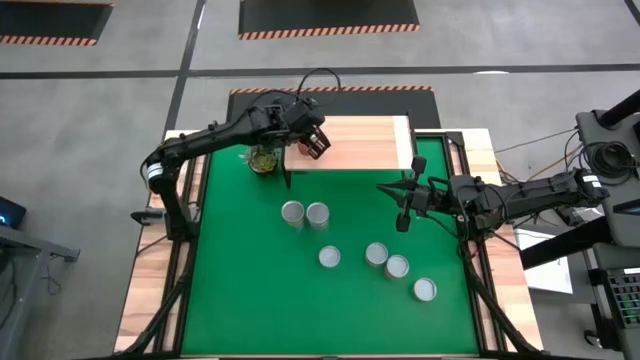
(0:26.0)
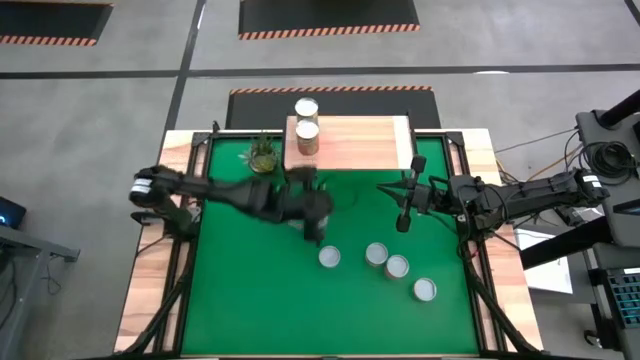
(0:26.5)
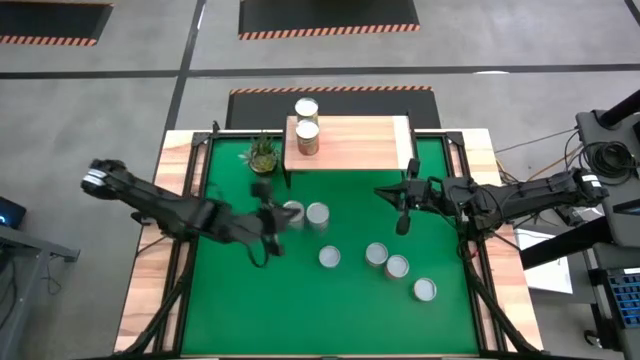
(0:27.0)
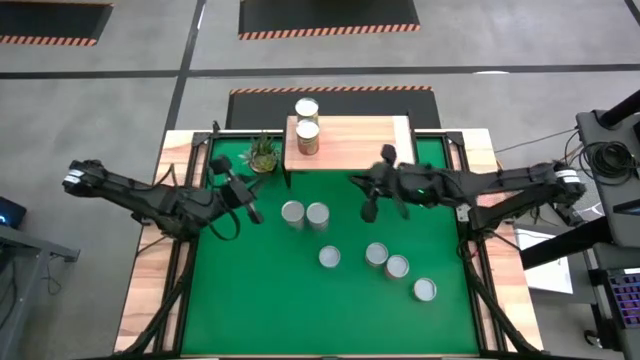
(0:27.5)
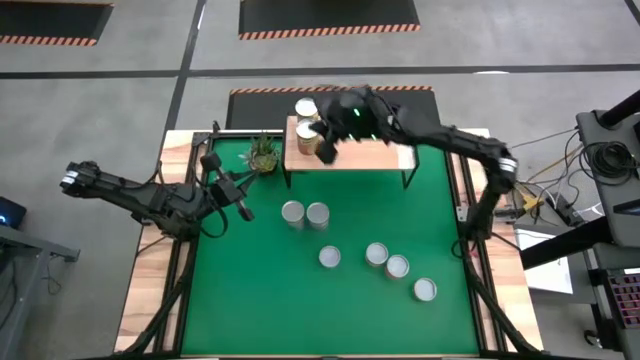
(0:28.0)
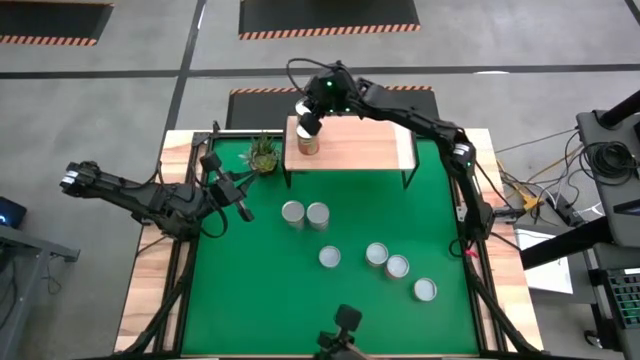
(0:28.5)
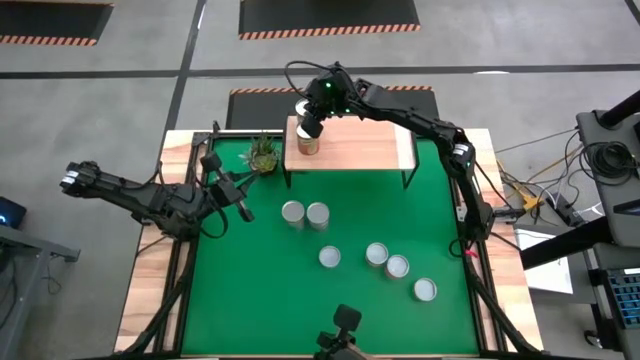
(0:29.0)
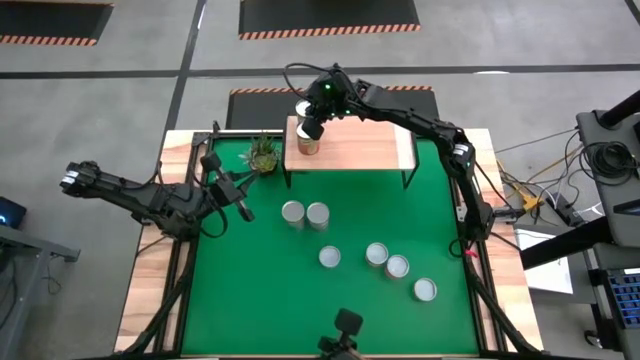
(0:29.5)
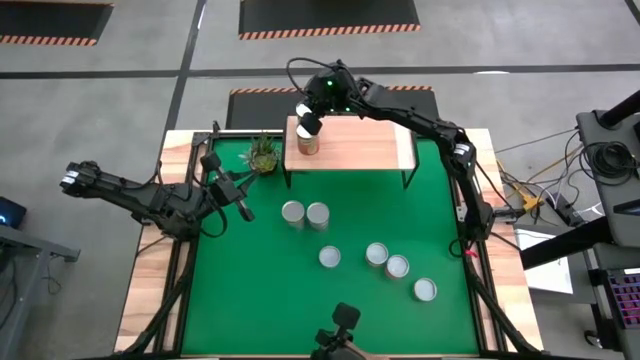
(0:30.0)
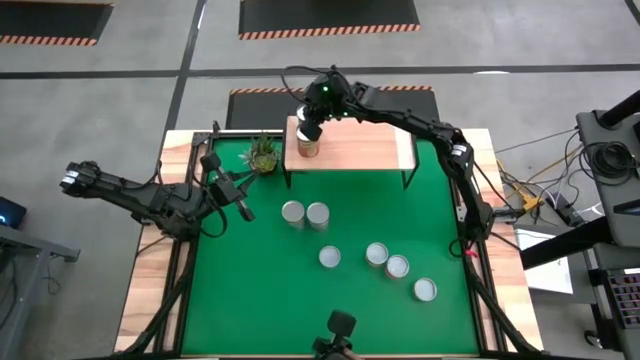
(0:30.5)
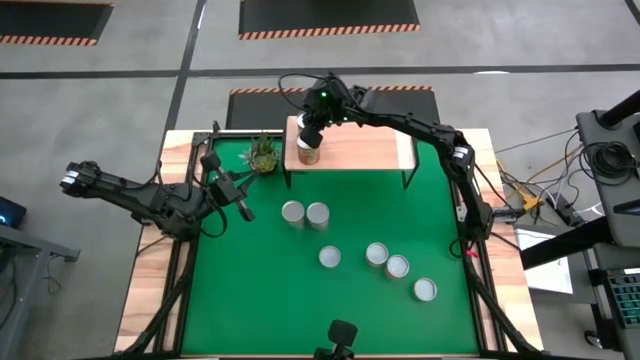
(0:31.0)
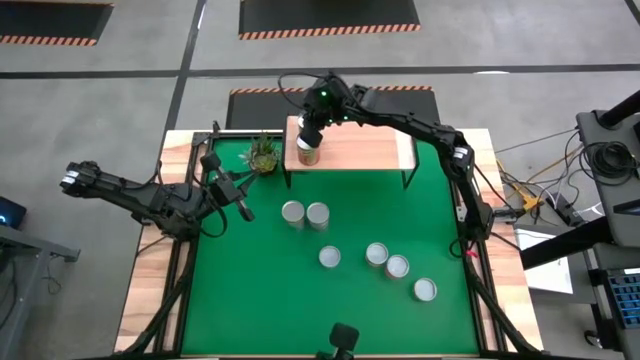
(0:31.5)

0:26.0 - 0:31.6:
Task: Pick and place cans onto a shelf
Put the canned pears on the shelf

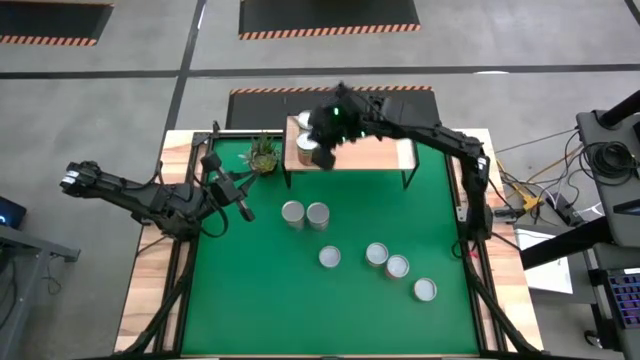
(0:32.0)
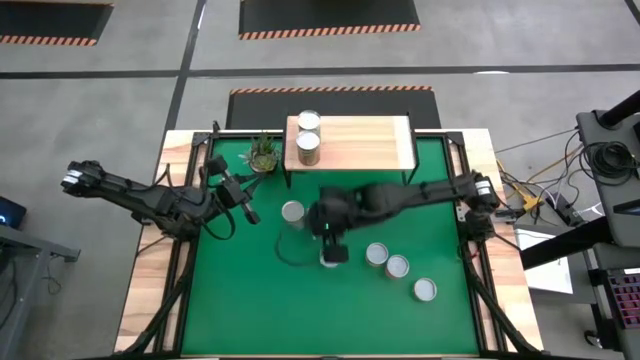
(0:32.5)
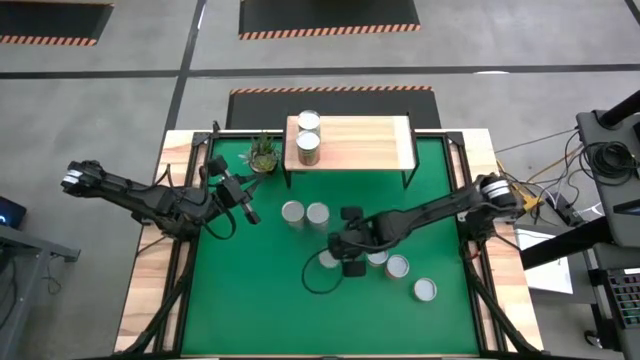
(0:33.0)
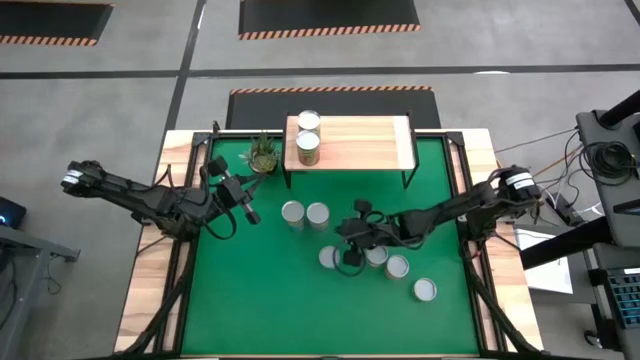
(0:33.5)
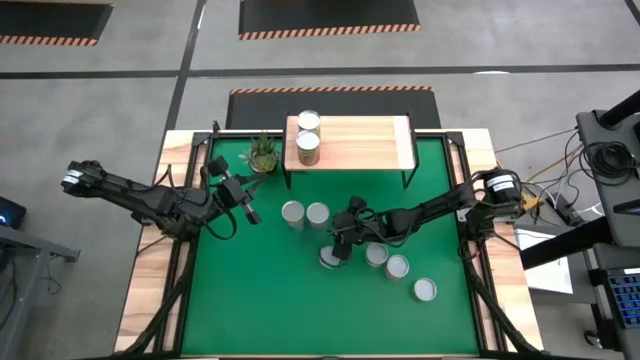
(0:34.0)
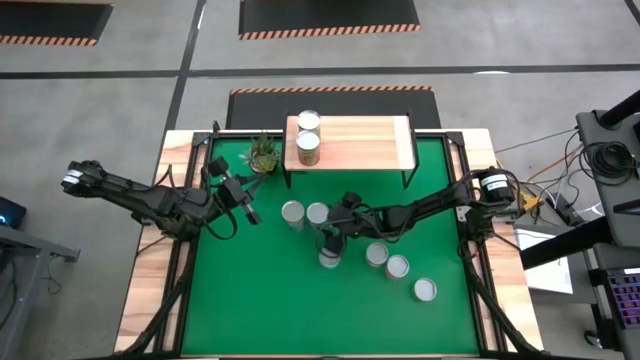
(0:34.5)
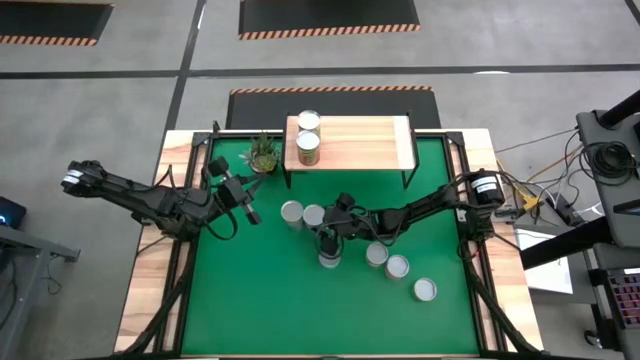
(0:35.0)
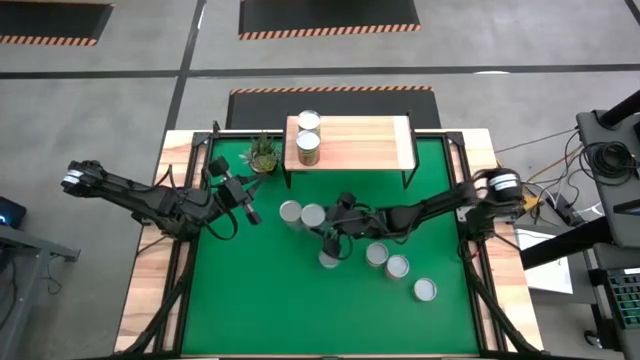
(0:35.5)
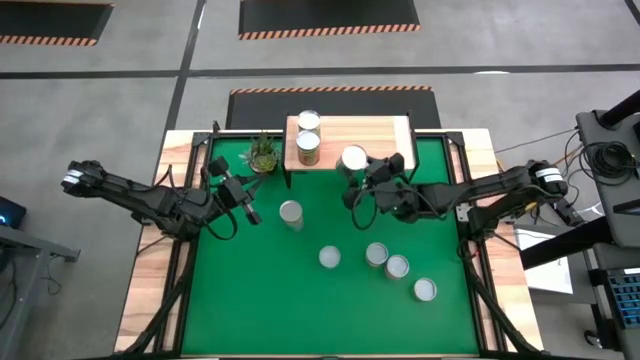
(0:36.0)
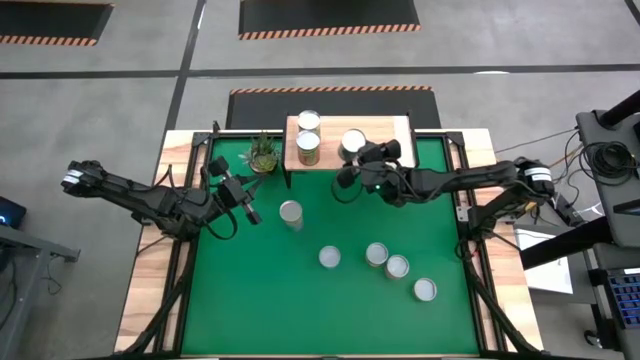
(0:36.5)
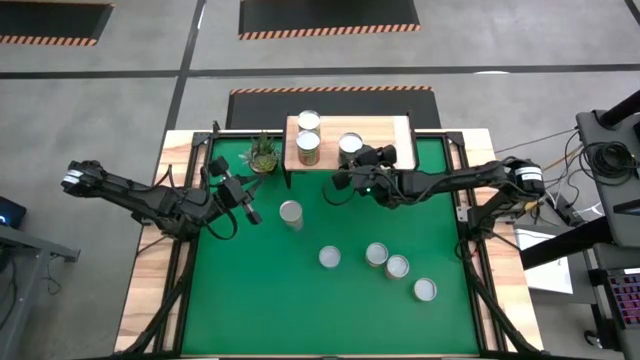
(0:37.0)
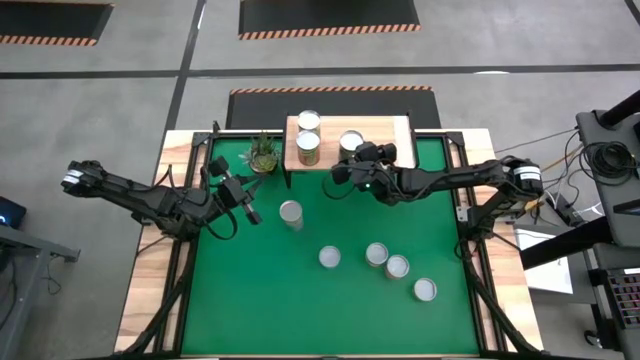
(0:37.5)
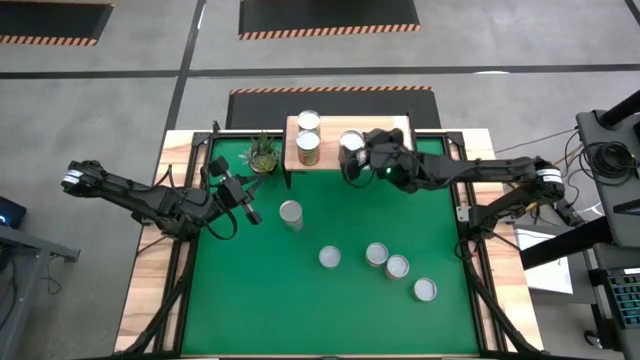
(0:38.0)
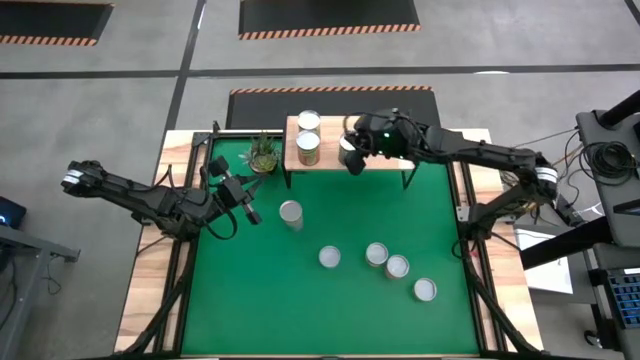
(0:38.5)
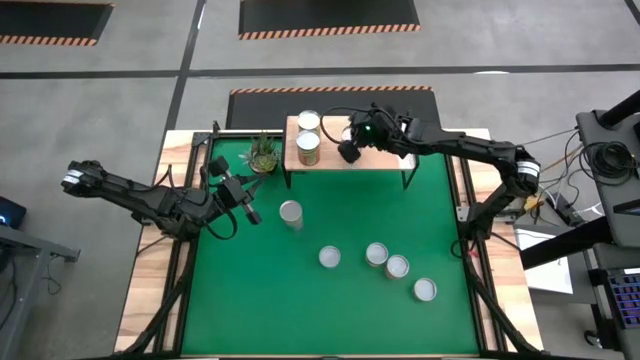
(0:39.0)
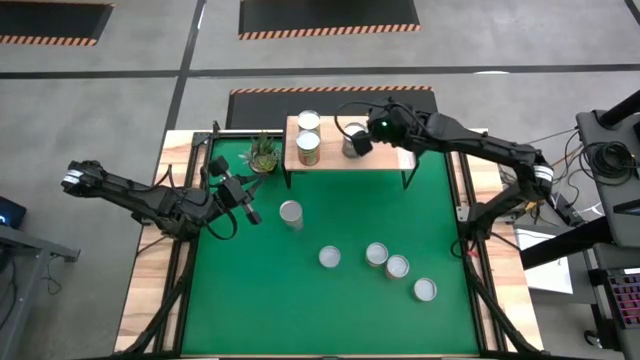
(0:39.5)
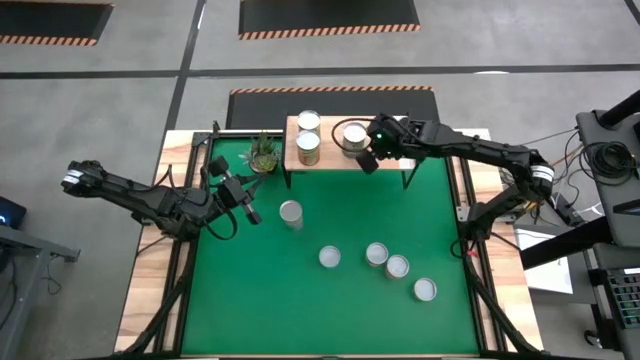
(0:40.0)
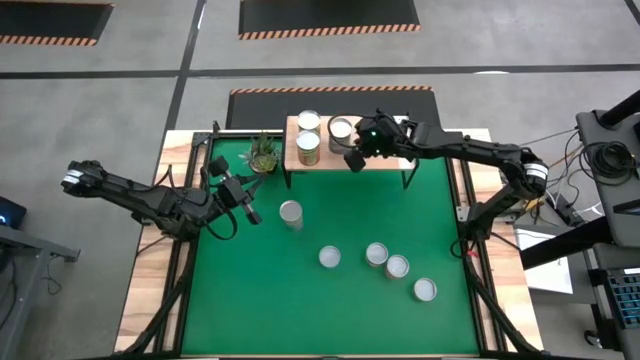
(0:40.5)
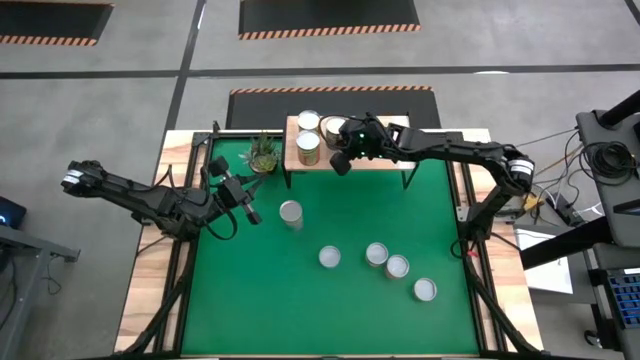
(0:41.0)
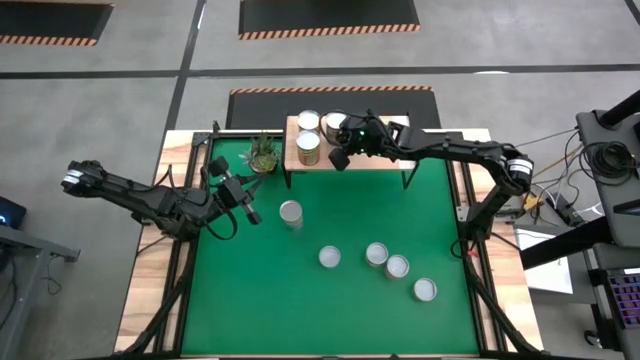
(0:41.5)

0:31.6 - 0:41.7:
Put the canned peas on the shelf

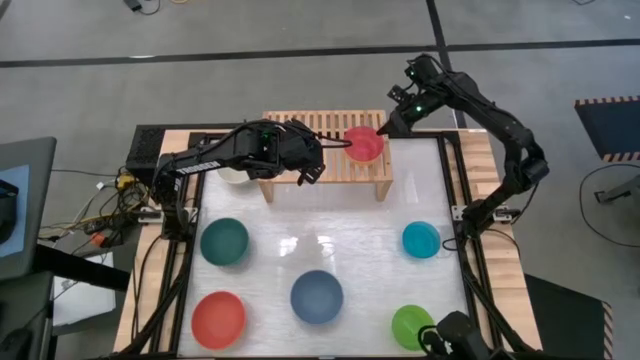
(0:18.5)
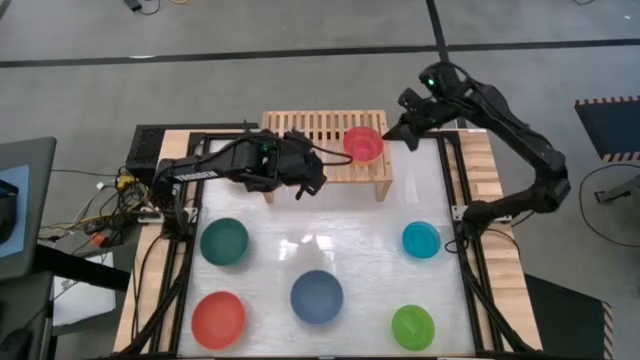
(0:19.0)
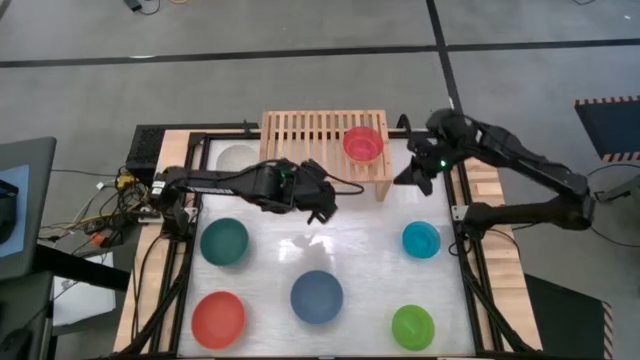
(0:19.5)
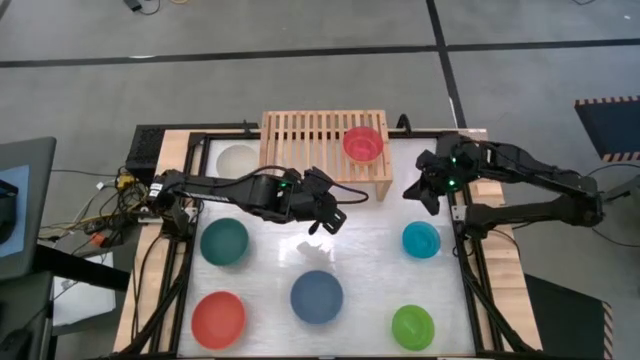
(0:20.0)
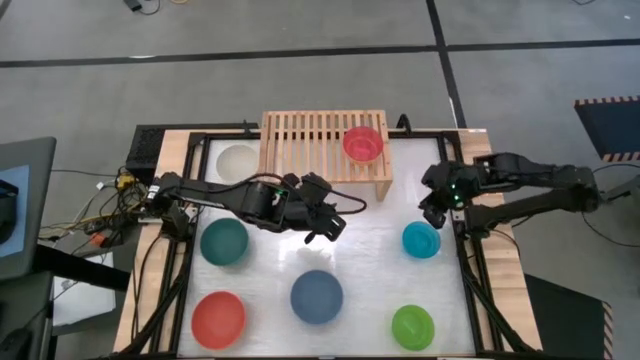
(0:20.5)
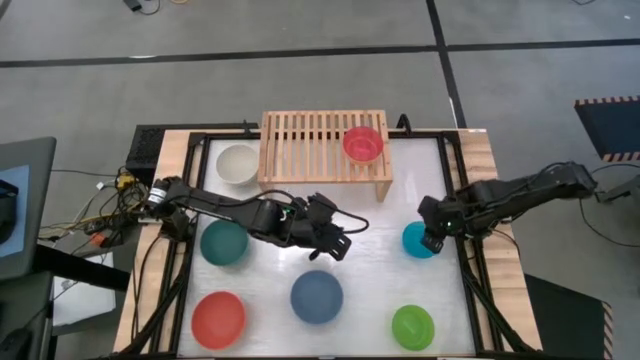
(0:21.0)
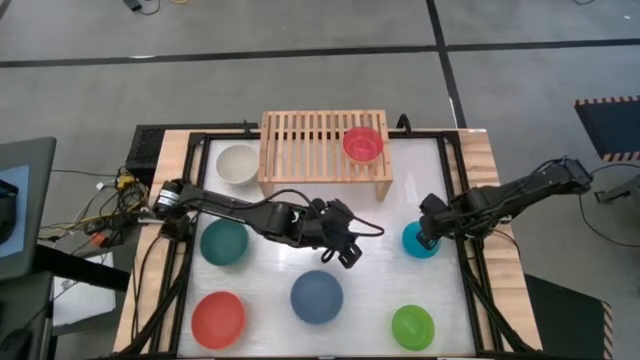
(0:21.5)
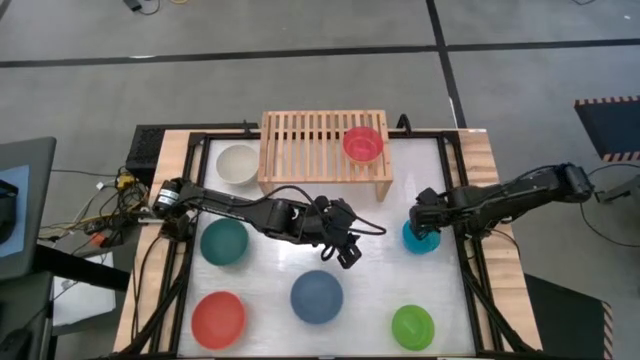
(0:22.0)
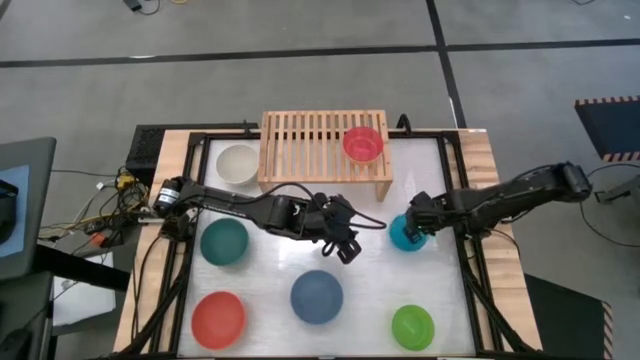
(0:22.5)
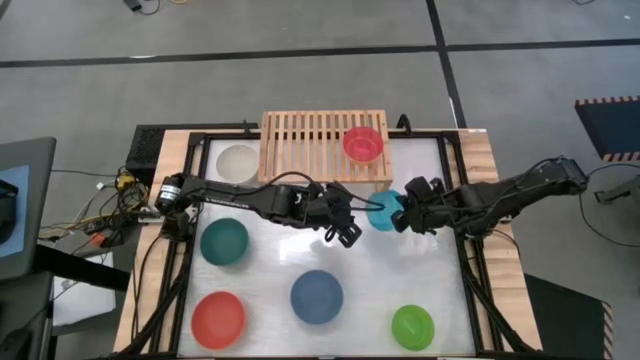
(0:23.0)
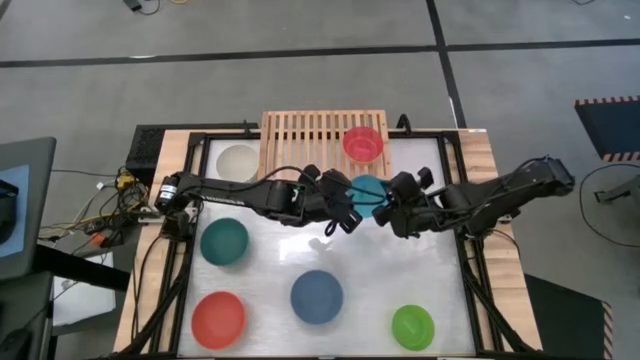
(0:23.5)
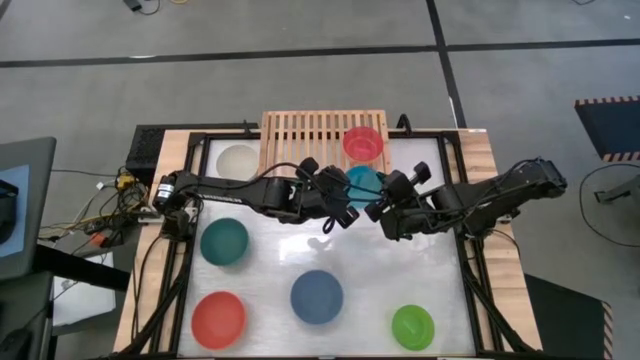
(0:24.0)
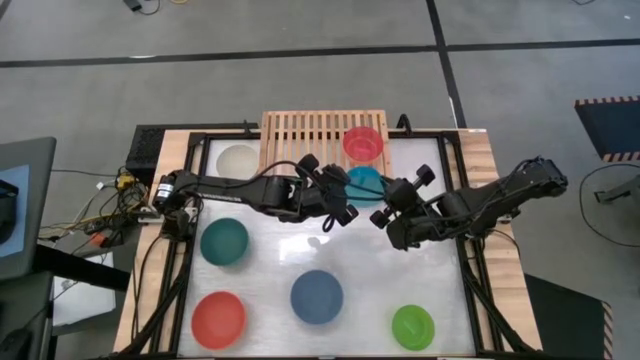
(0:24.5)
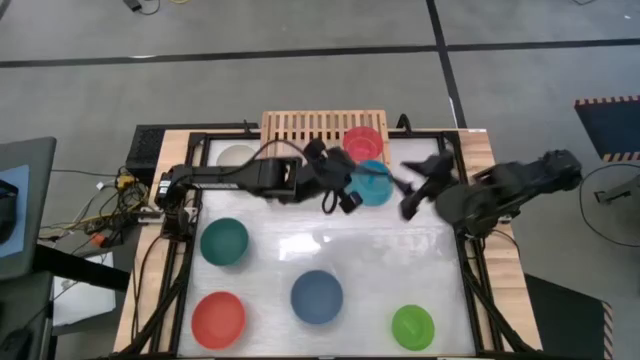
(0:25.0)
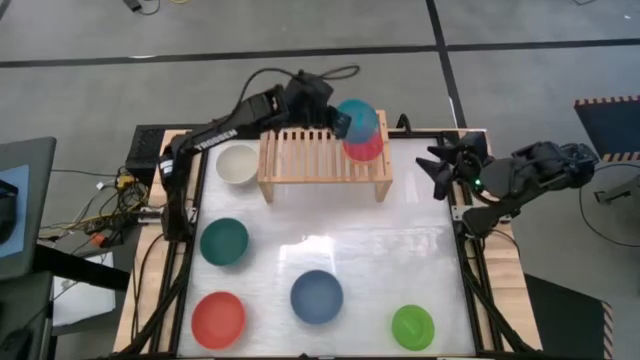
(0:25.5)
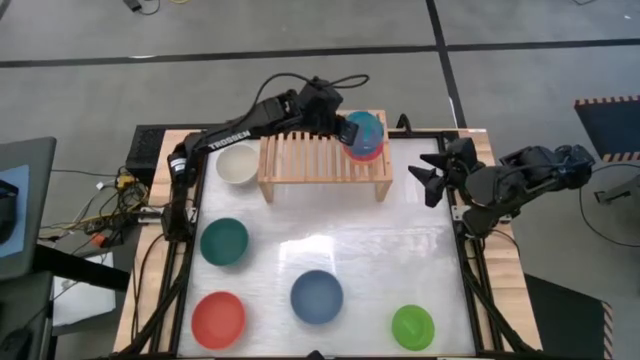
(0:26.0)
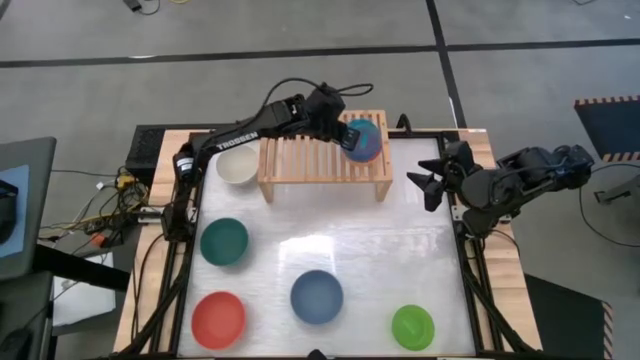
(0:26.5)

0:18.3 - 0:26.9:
Task: Place and stack bowls onto a shelf
Stack the small blue bowl on the small pink bowl on the shelf
